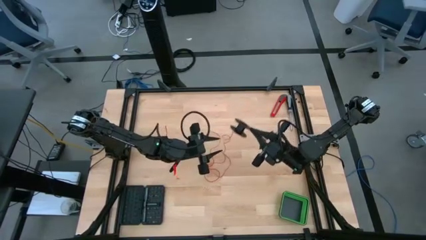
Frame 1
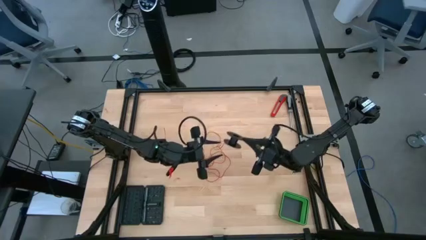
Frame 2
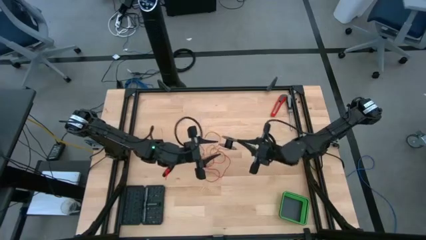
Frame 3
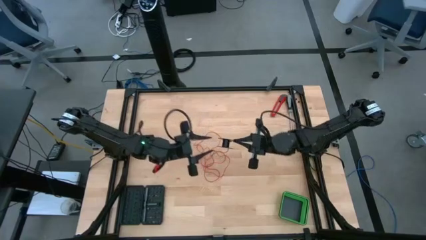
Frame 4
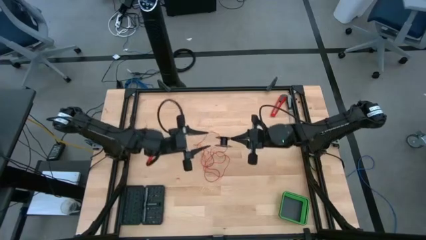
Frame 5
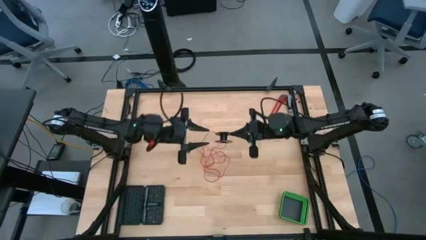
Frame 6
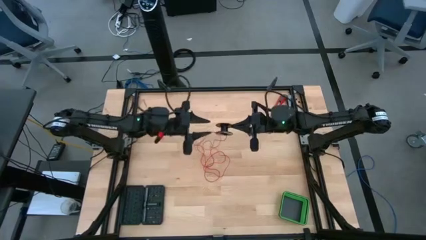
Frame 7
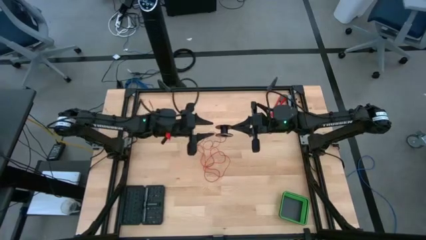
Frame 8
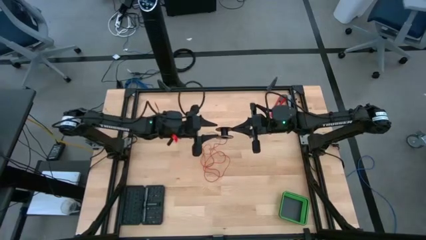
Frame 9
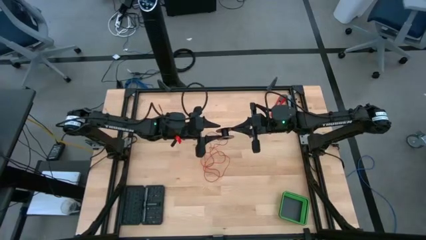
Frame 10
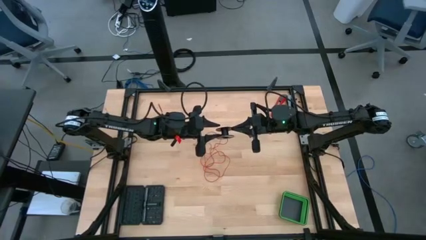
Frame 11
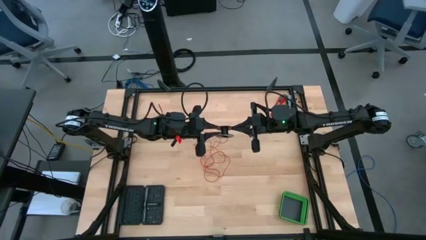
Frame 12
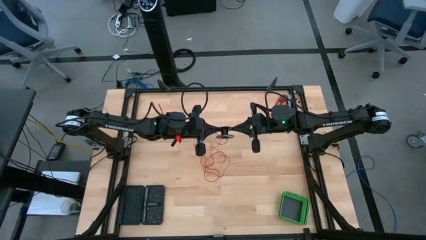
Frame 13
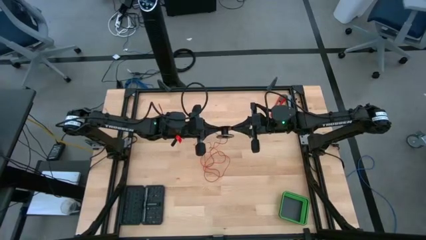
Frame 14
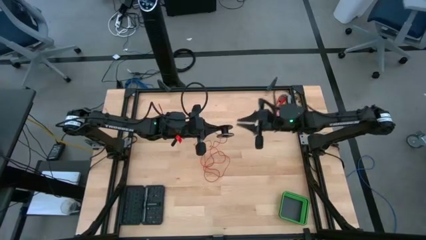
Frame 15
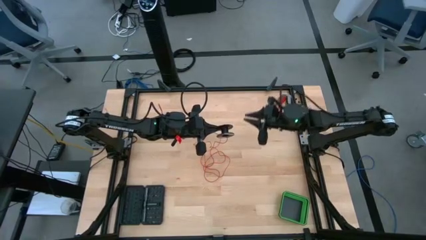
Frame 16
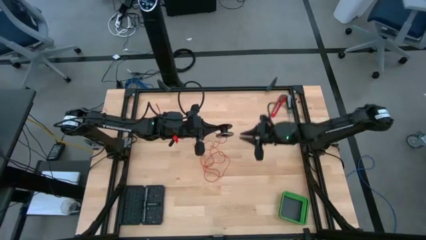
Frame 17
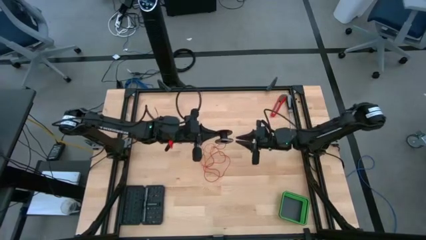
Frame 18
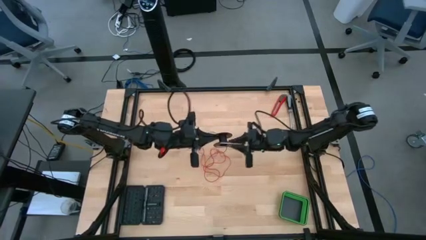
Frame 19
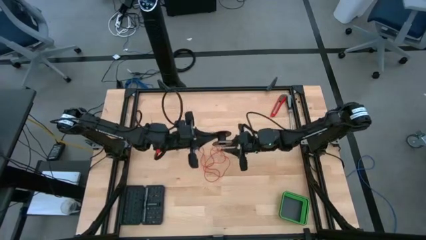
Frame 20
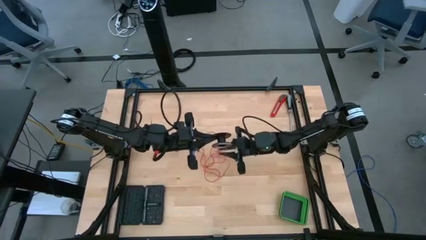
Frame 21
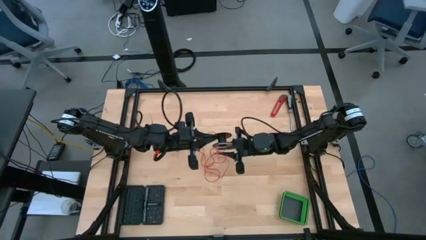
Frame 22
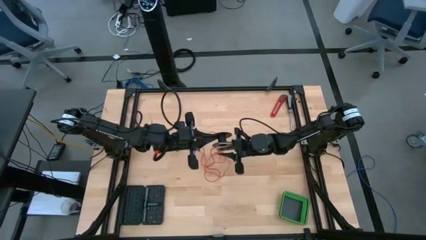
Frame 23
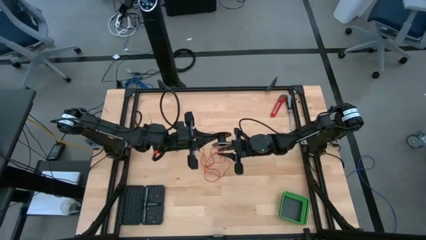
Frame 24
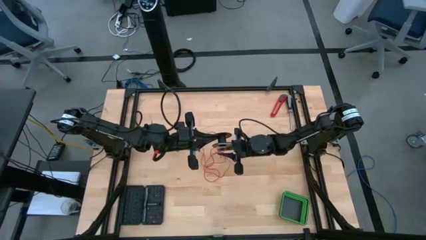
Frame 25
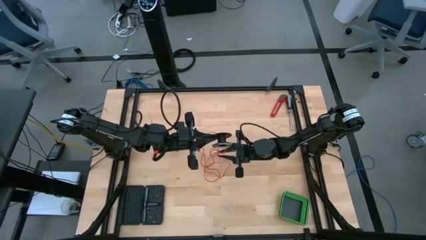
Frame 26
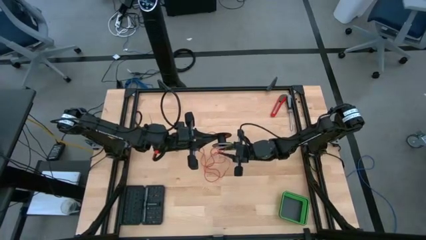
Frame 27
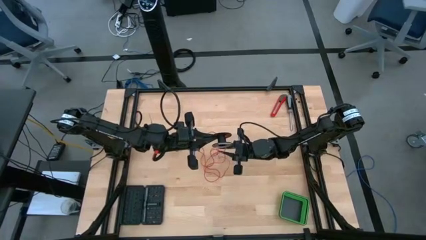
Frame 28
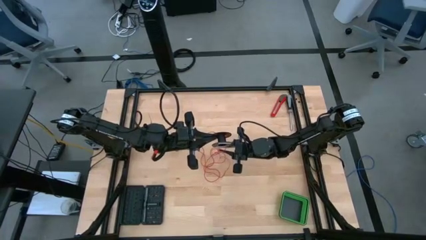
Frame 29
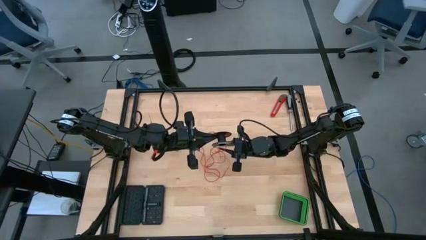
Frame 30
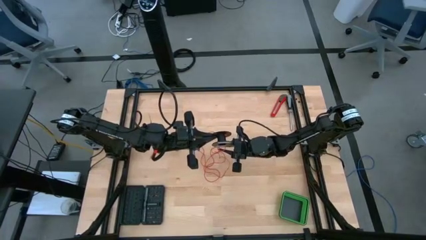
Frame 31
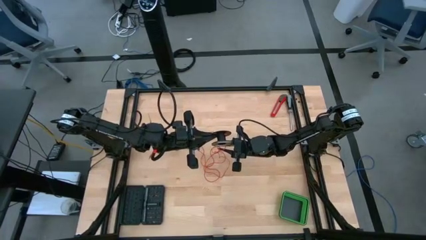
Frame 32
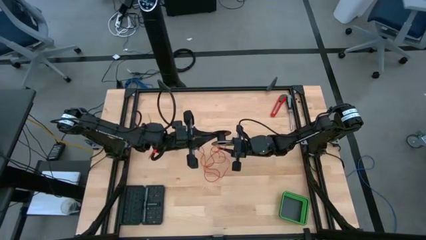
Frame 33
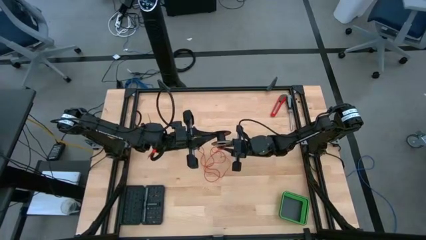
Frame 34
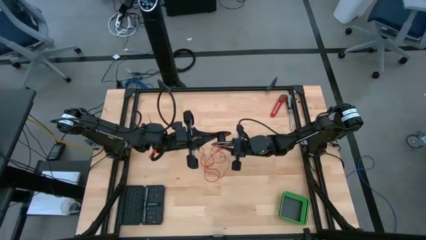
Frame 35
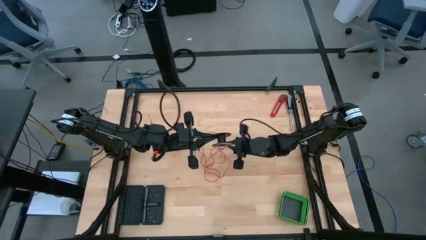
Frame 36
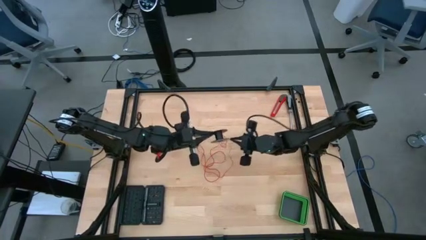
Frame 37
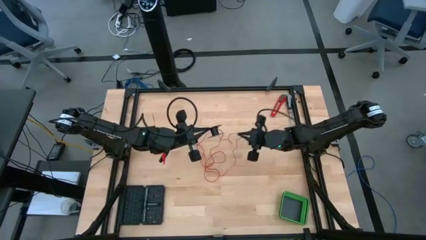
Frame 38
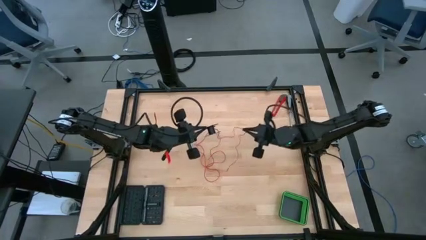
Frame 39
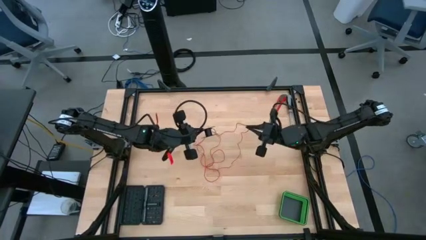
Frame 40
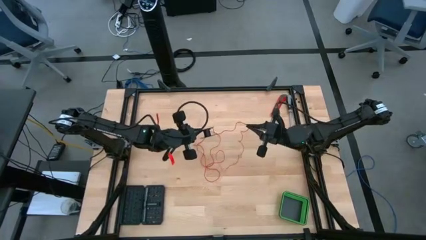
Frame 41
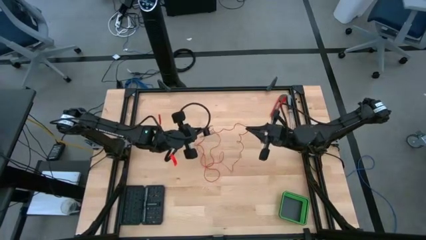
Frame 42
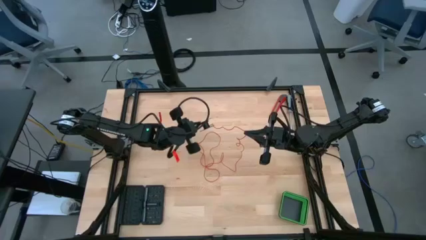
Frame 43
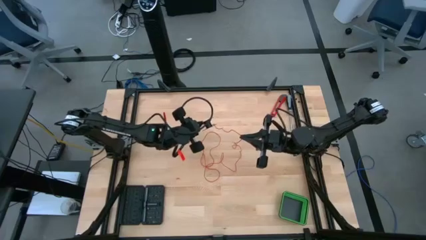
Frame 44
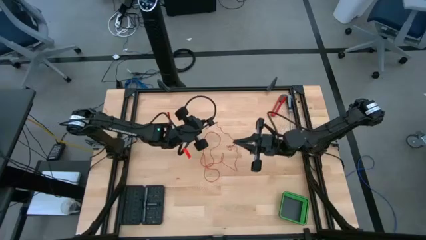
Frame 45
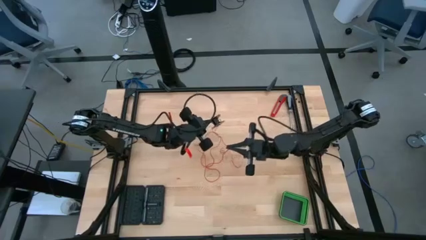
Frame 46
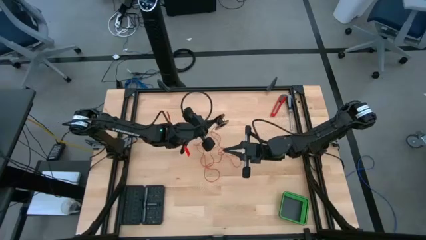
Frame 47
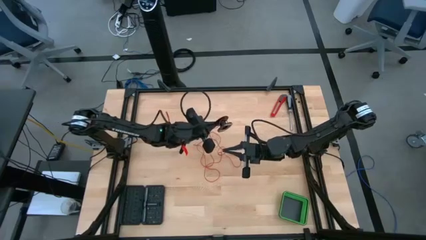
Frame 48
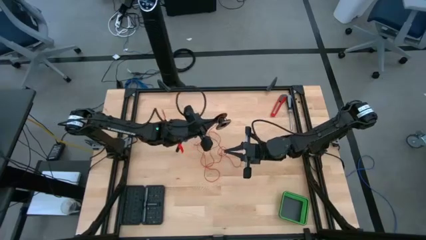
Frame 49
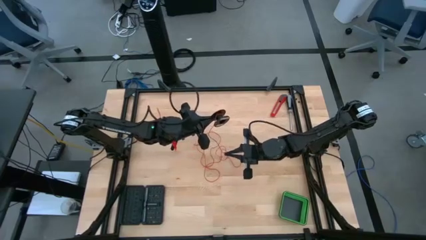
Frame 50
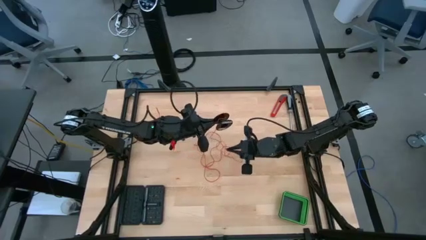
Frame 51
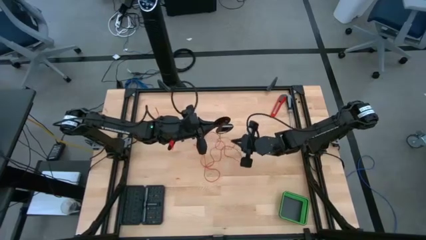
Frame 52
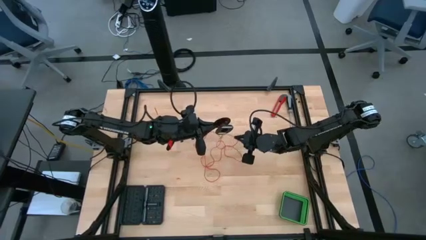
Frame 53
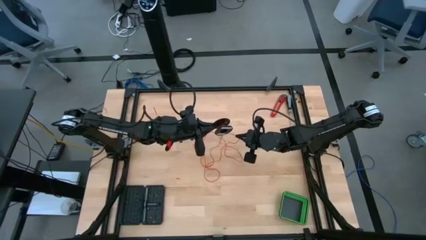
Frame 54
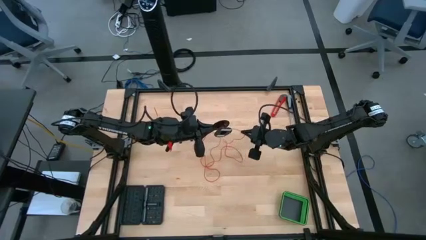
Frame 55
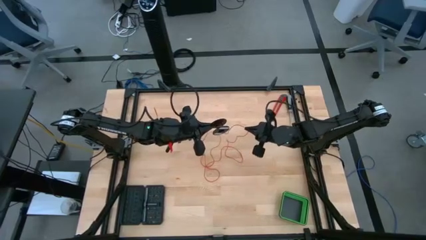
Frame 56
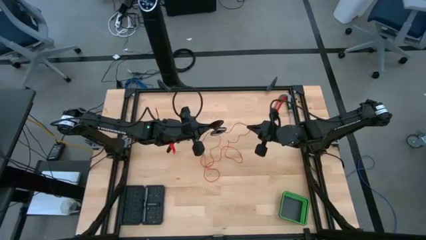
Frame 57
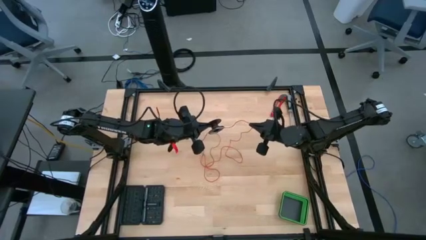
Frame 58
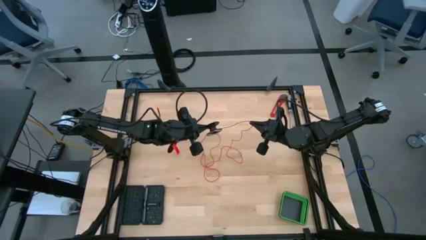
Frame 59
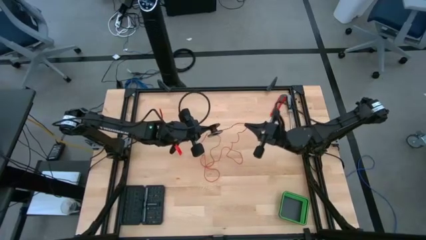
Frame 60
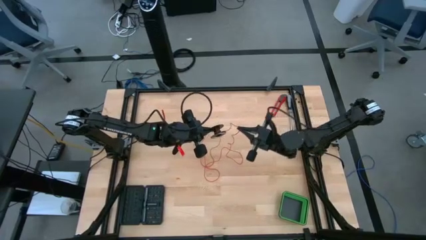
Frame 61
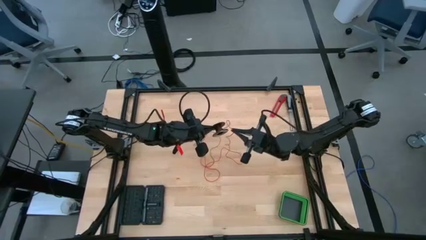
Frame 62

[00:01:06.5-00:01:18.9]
Task: Coil cords
Coil the red wire onto the black spool

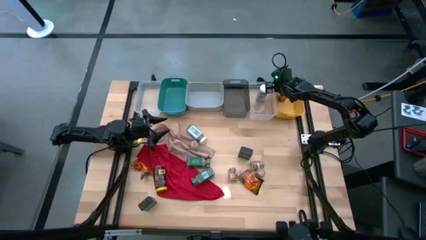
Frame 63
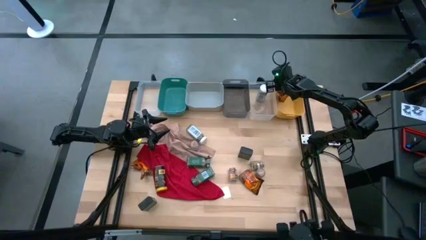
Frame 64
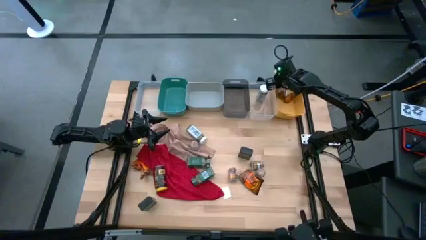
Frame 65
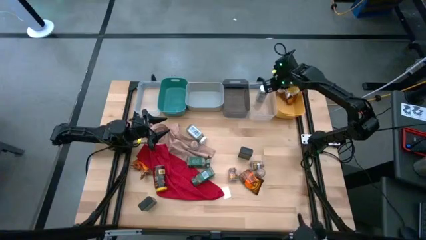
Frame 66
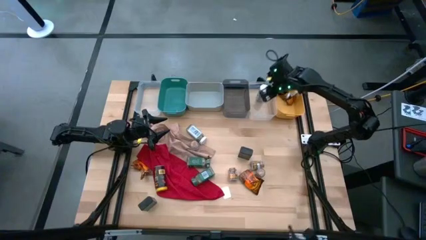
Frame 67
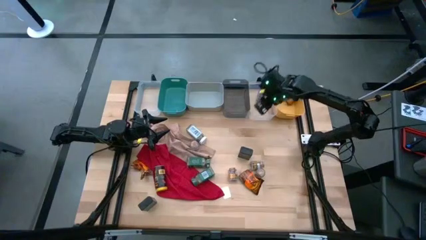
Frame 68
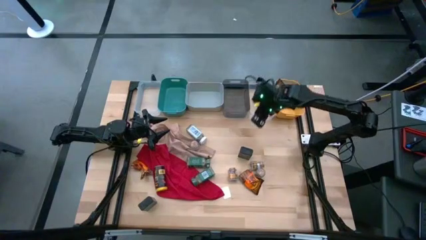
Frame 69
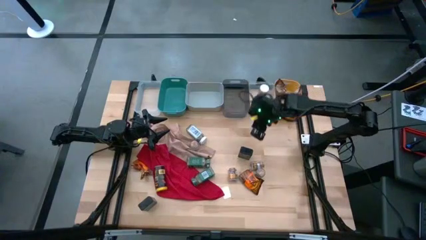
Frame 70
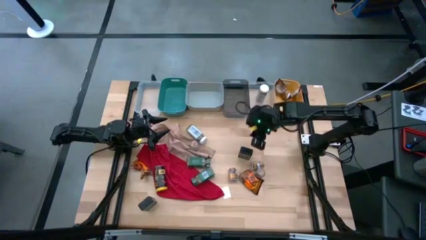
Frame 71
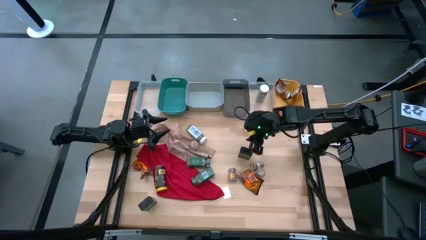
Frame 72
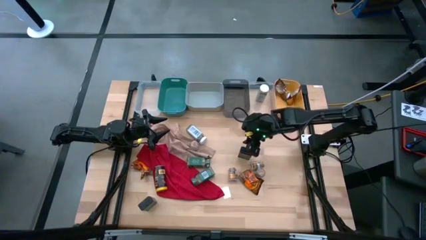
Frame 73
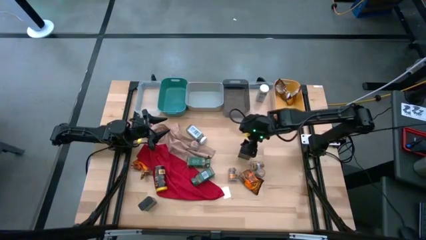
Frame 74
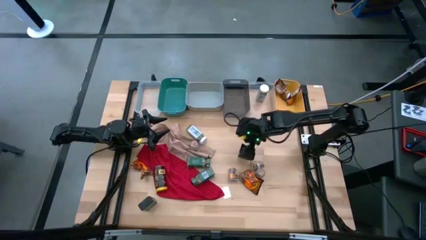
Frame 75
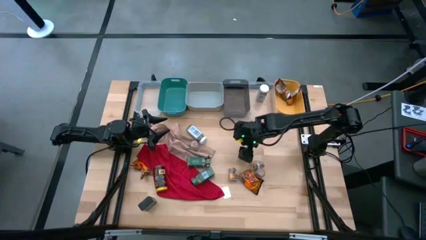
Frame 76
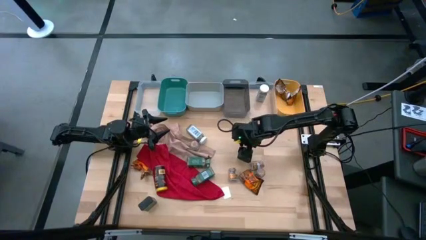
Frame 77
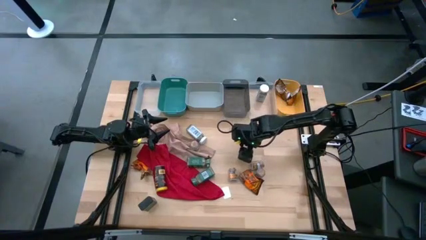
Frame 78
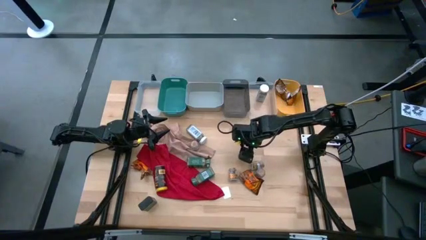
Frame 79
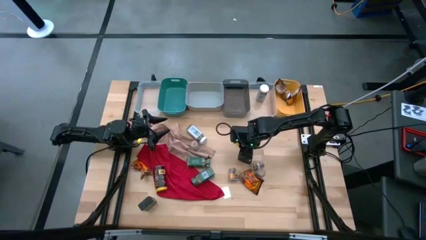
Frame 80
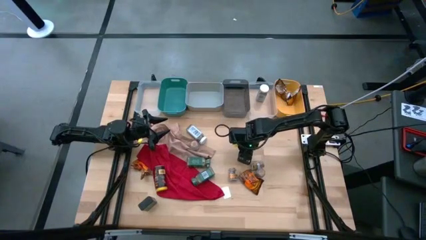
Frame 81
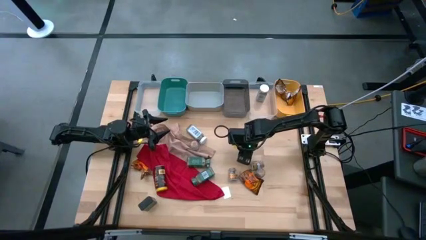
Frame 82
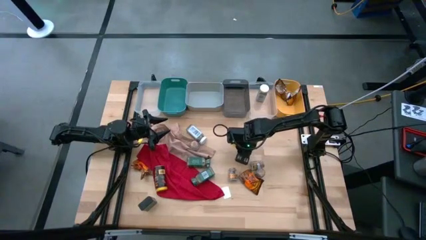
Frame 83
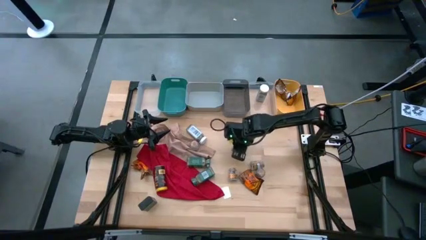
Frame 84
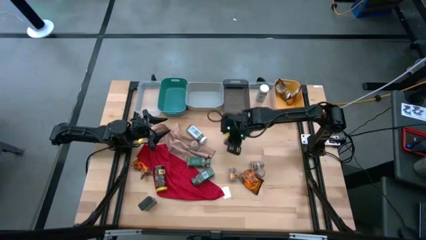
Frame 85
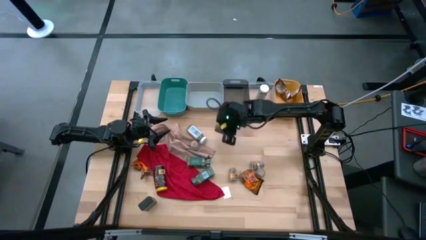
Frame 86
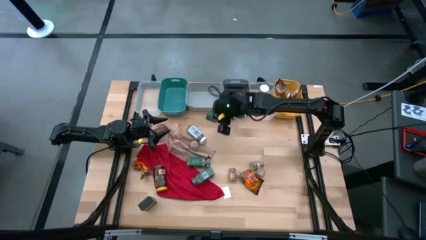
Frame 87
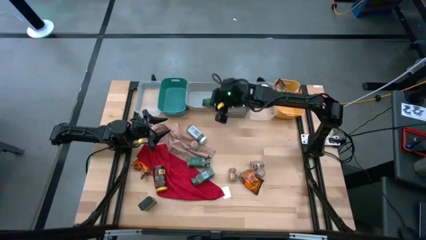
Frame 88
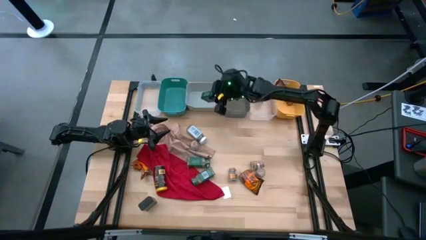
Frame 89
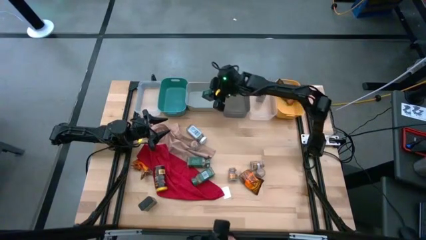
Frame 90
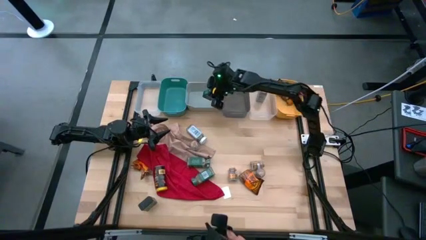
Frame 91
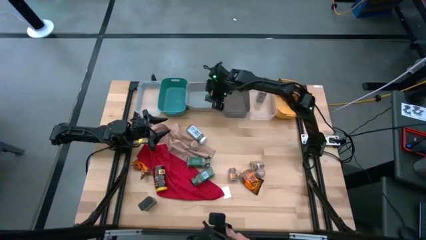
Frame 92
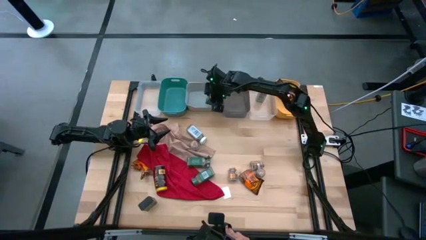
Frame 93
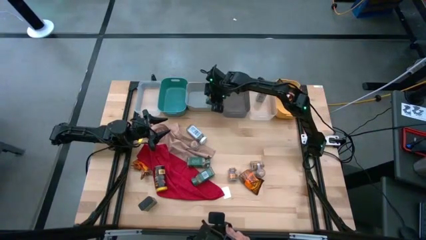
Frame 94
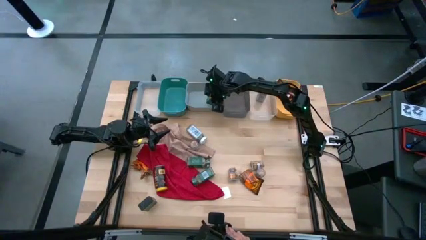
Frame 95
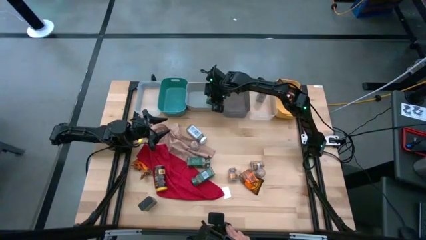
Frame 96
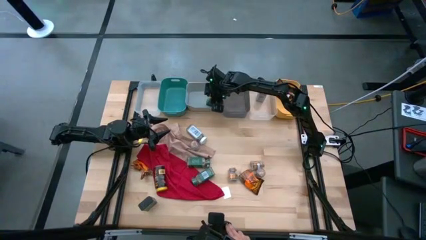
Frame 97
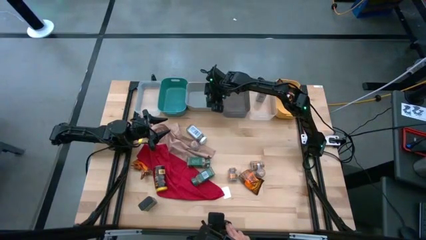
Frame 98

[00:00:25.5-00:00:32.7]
Task: Sort spices by type
Put the black seasoning can into the gray bin
